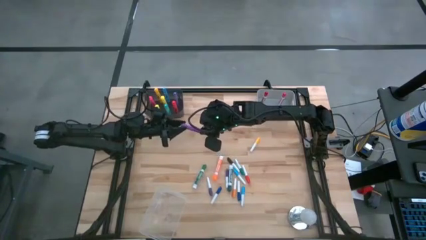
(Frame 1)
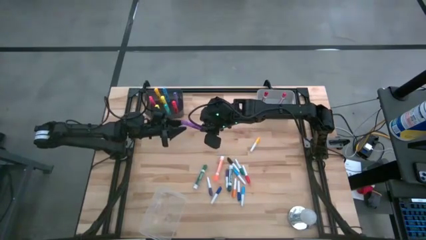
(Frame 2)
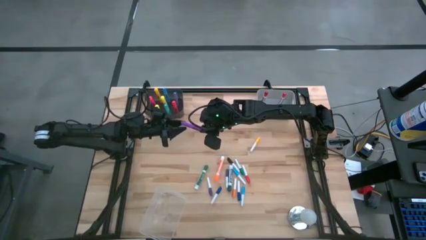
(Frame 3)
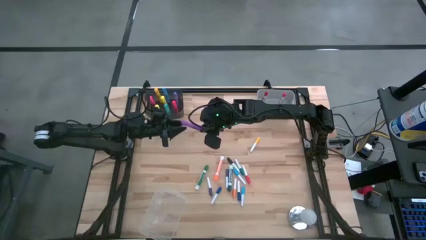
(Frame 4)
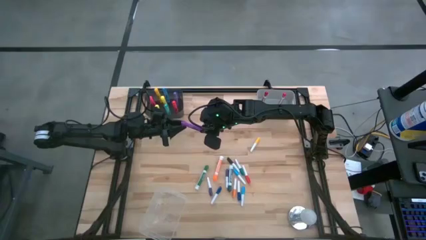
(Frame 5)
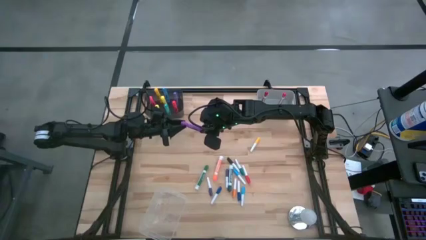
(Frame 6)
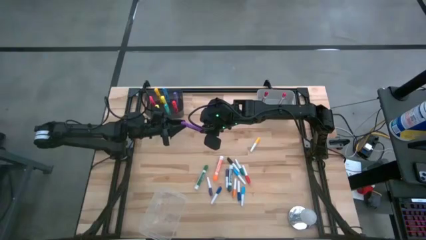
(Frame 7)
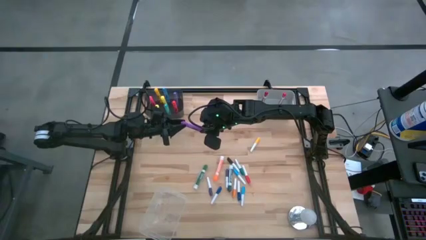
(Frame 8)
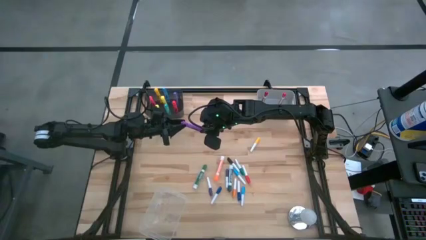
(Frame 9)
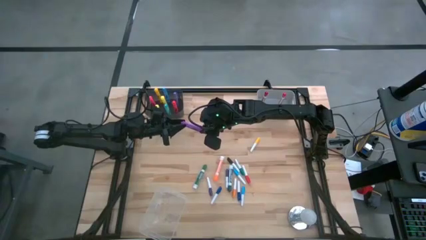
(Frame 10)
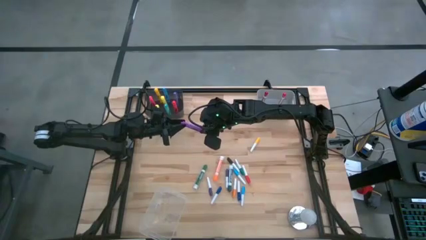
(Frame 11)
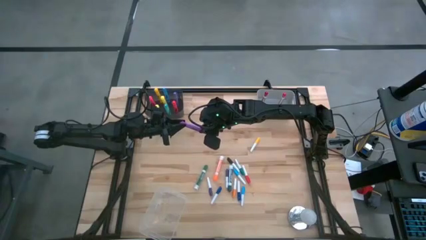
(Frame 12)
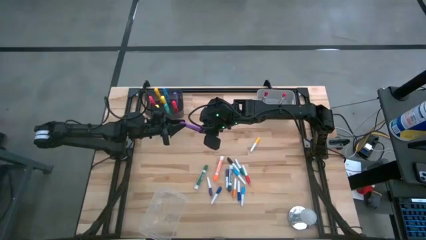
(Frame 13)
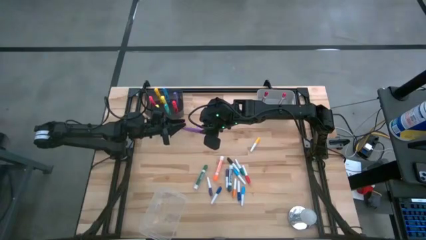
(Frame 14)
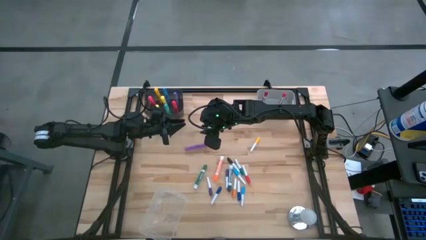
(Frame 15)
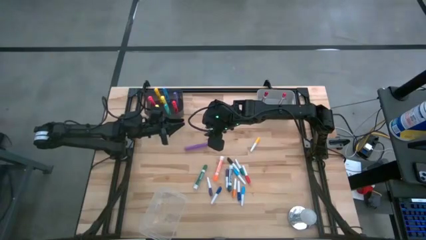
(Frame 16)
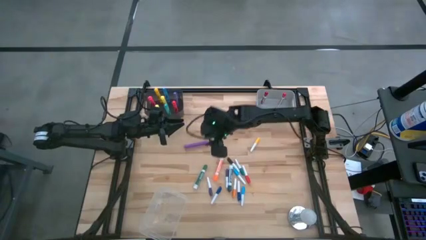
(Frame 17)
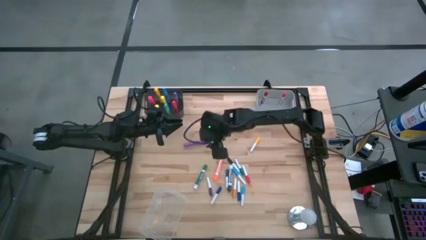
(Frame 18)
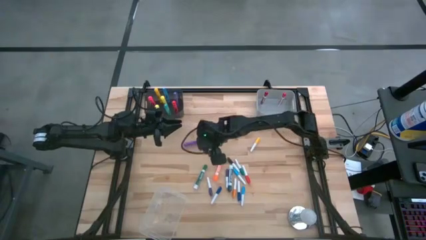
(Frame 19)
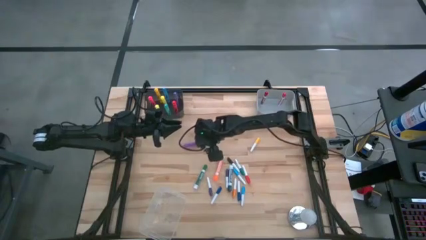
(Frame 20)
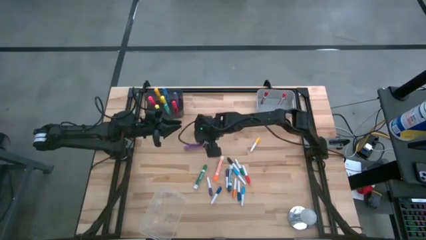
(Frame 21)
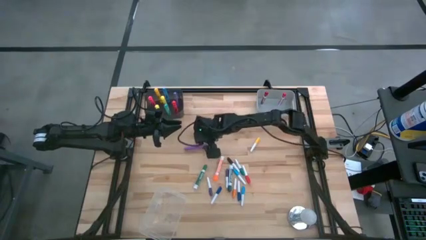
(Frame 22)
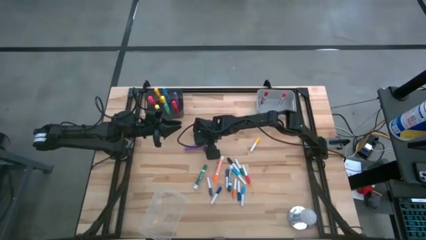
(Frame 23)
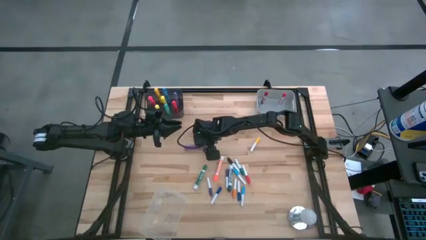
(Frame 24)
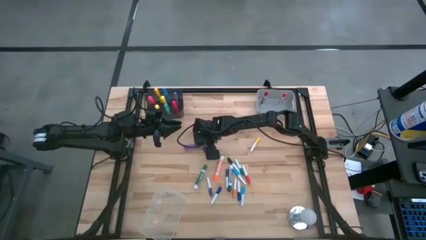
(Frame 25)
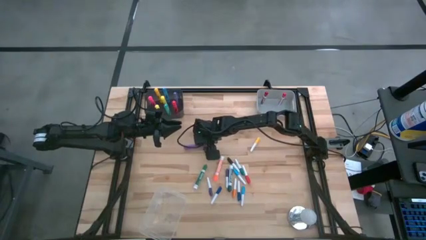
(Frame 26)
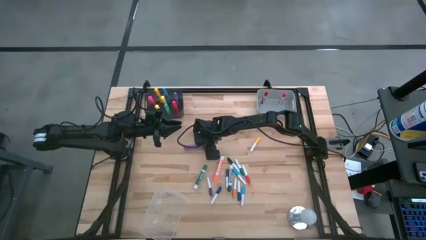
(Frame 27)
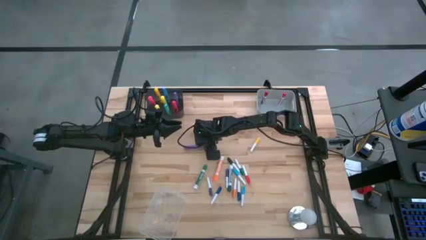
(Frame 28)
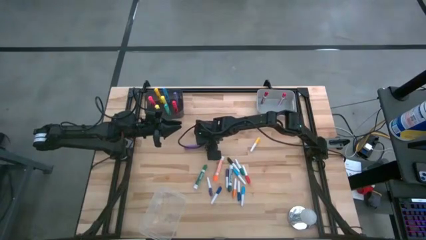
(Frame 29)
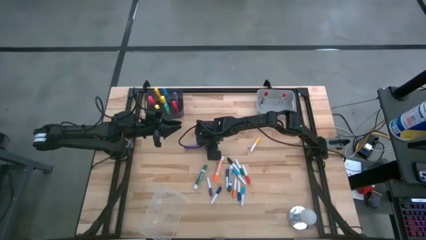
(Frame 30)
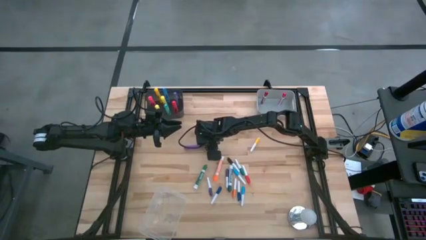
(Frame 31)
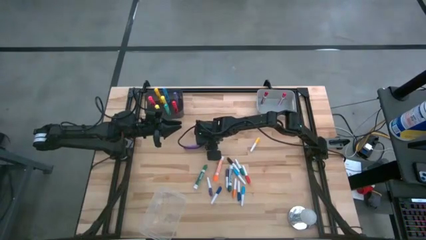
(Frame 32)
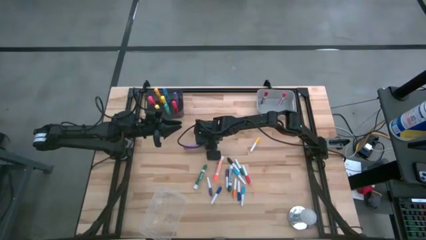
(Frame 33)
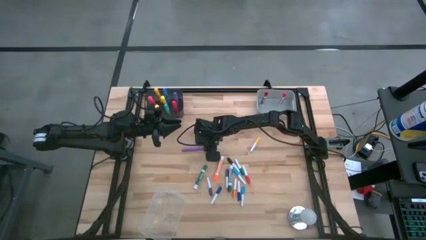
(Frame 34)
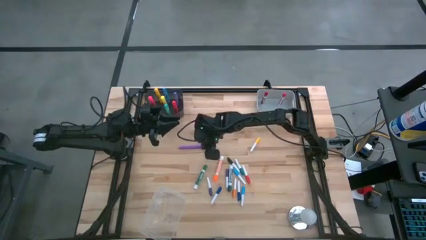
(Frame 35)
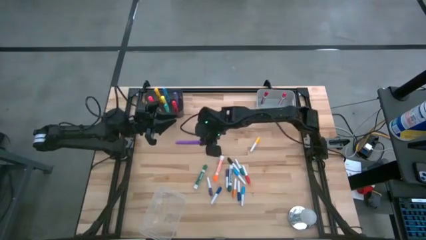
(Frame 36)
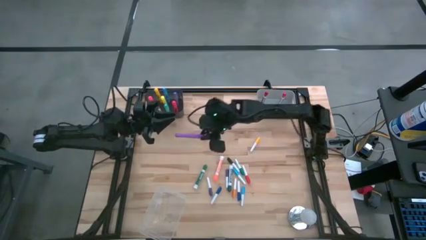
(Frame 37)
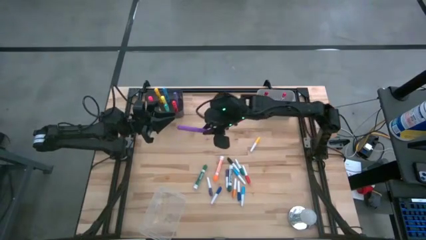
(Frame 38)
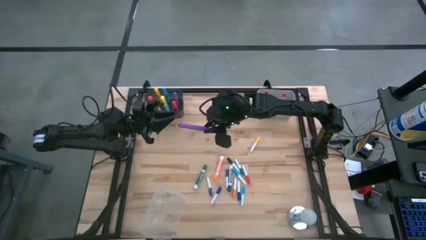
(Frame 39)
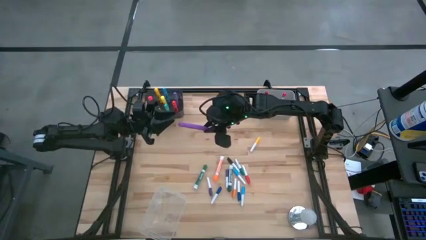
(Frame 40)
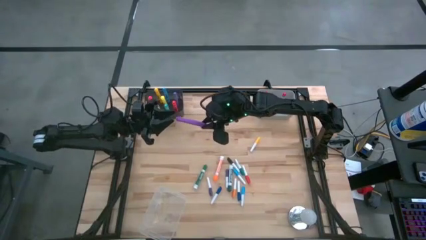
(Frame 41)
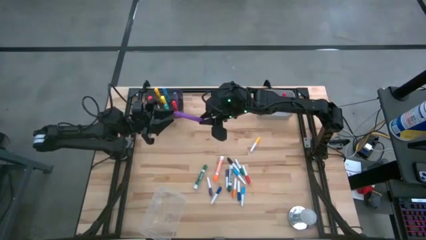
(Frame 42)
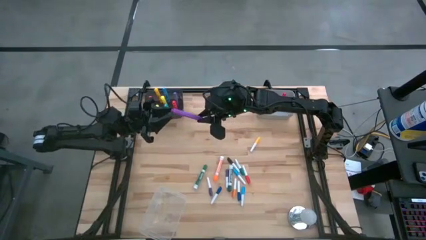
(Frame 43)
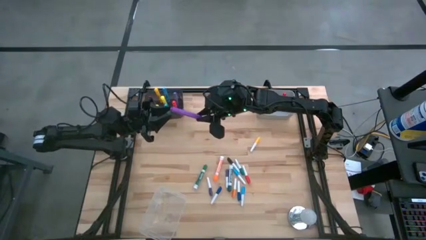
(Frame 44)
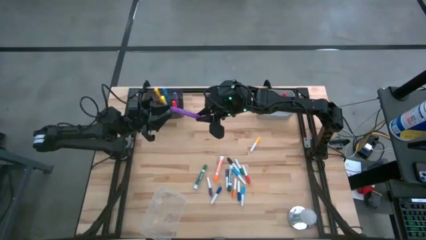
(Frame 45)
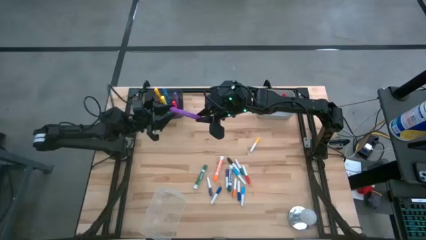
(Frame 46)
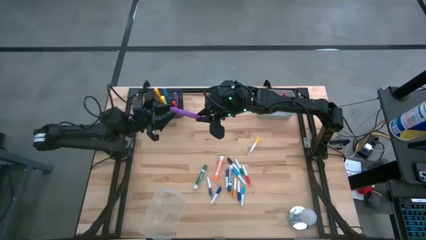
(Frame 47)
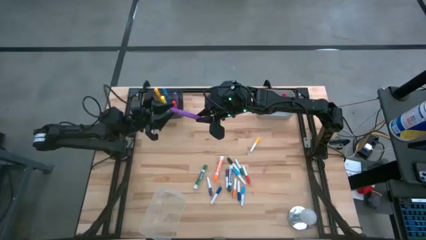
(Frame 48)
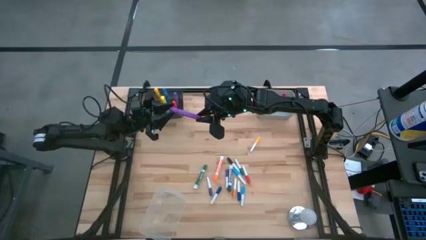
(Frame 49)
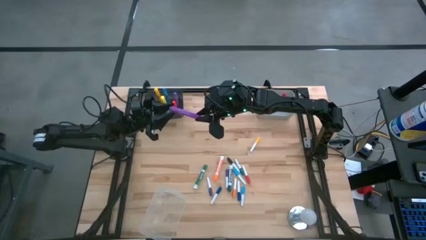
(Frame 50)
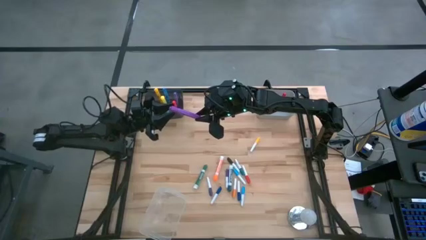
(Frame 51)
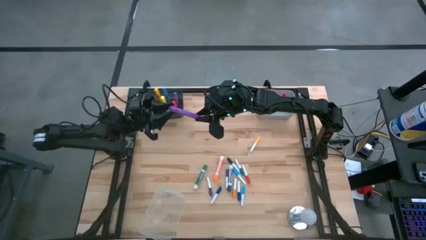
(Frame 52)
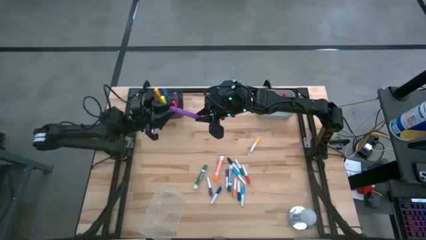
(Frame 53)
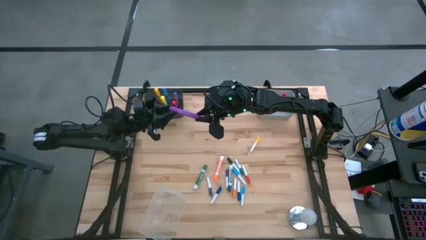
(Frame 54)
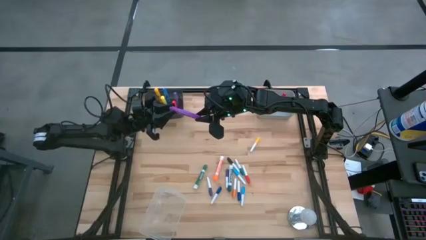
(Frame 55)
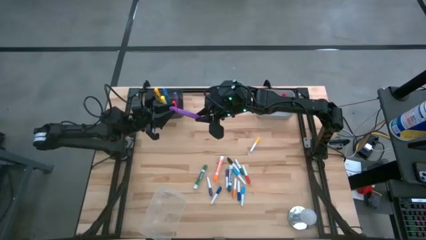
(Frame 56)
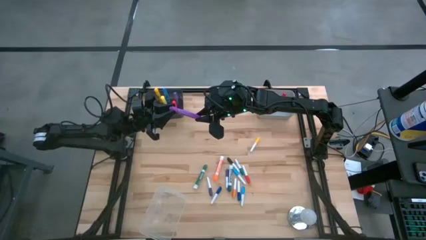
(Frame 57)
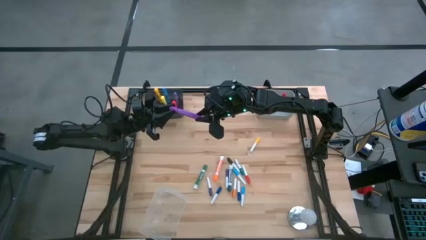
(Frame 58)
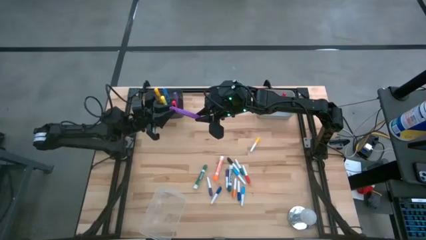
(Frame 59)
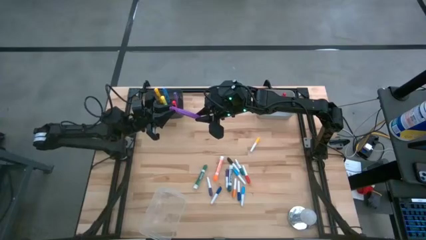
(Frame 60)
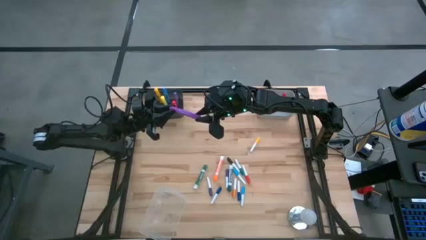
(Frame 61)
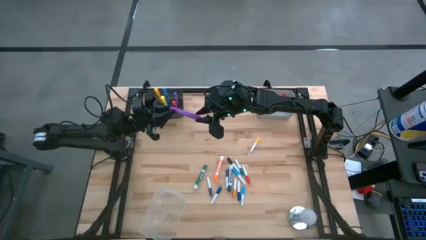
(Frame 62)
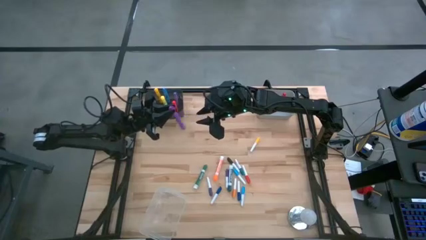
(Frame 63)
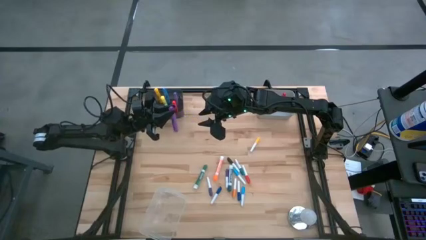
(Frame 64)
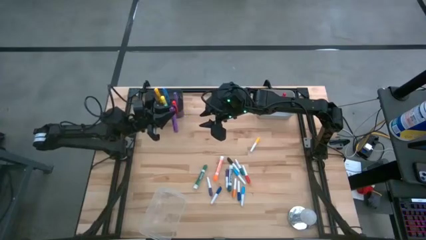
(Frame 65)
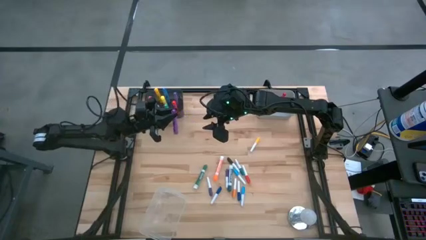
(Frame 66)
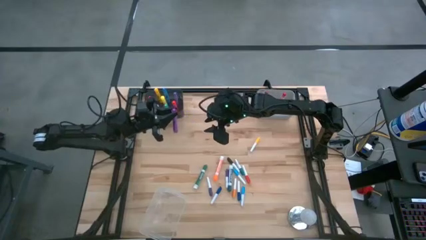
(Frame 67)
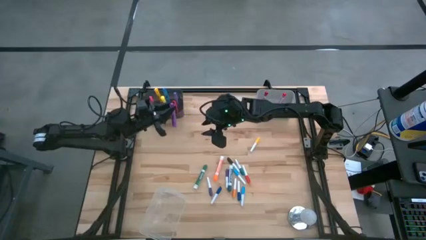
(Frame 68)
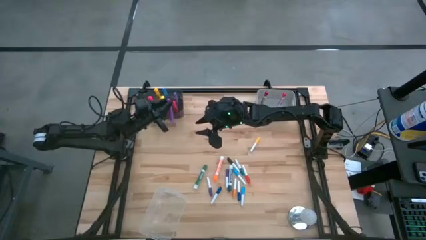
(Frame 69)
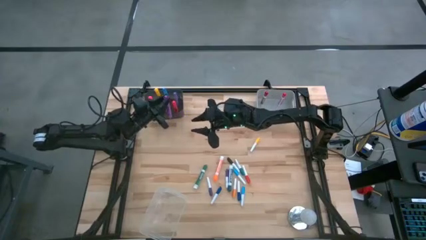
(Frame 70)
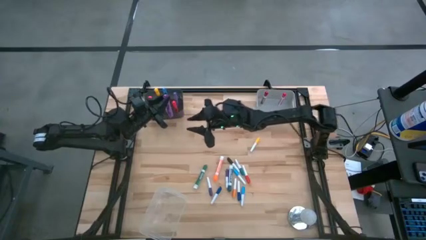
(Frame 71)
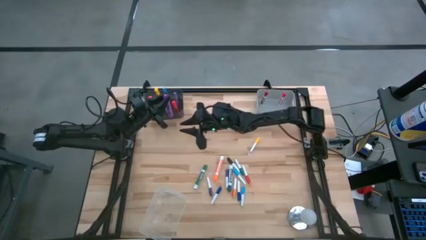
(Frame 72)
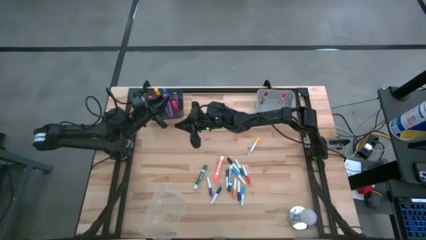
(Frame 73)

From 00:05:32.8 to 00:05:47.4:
Task: Pick & Place Markers
Put the violet highlighter pen into the black bin
